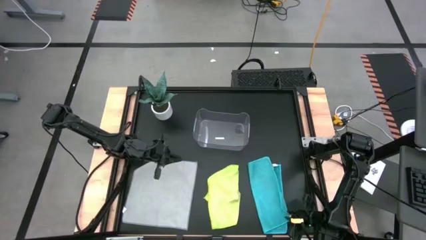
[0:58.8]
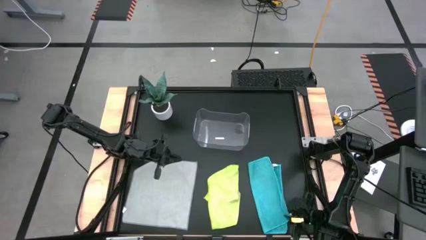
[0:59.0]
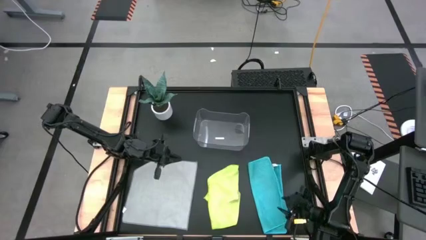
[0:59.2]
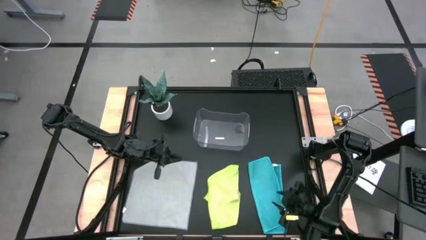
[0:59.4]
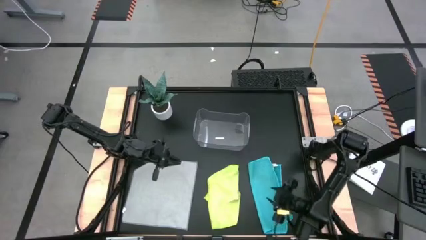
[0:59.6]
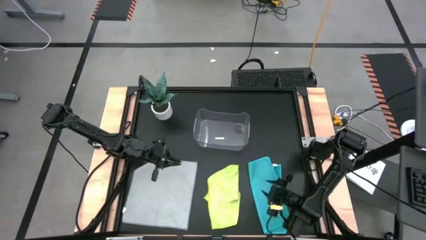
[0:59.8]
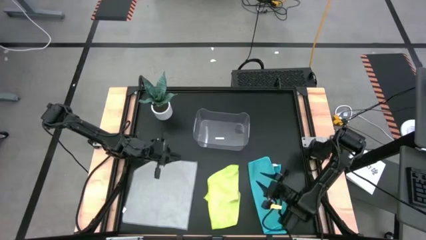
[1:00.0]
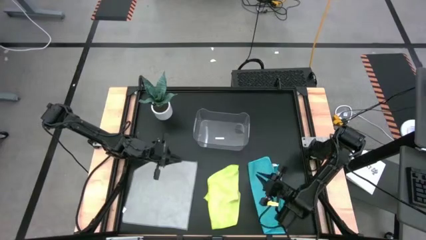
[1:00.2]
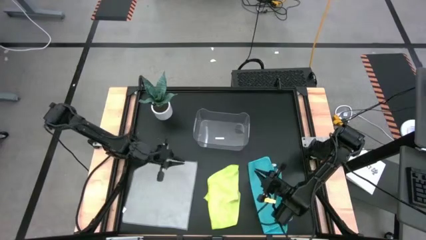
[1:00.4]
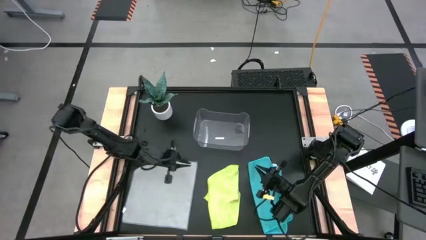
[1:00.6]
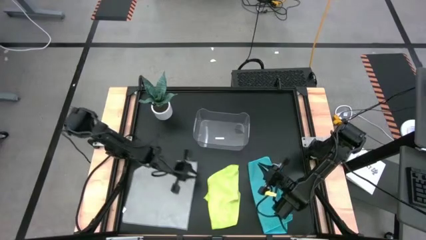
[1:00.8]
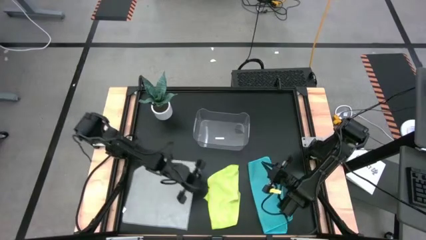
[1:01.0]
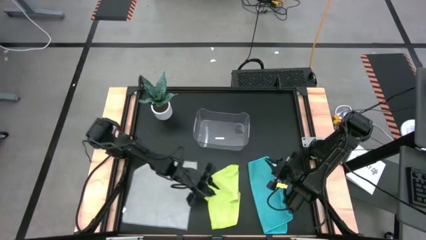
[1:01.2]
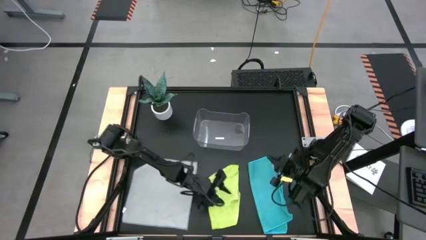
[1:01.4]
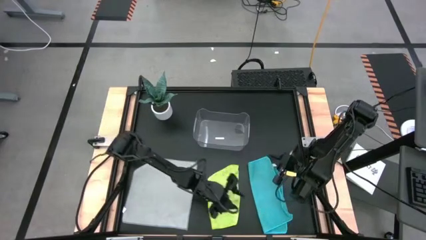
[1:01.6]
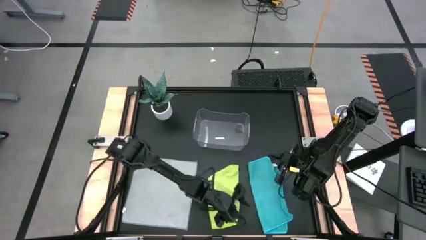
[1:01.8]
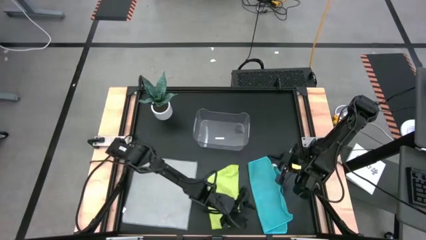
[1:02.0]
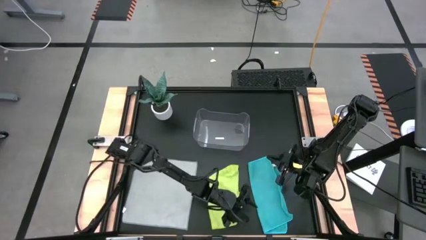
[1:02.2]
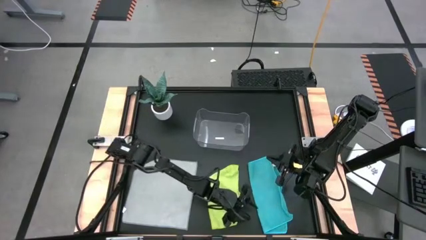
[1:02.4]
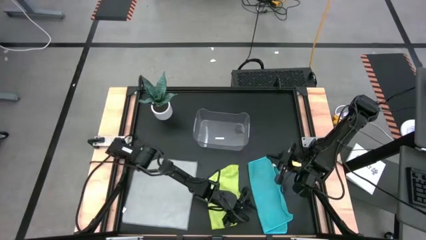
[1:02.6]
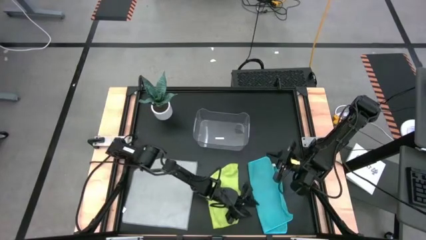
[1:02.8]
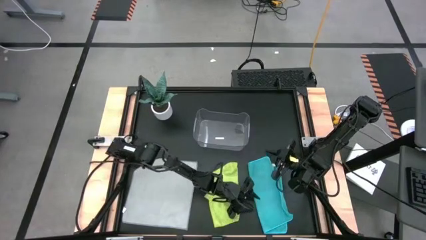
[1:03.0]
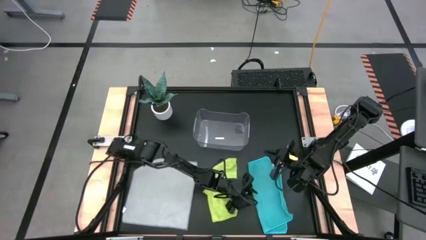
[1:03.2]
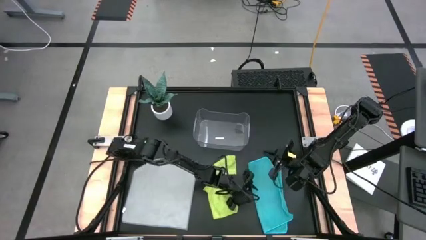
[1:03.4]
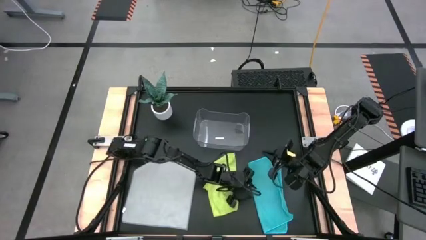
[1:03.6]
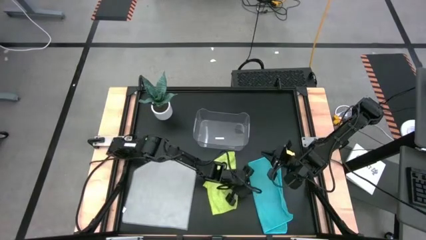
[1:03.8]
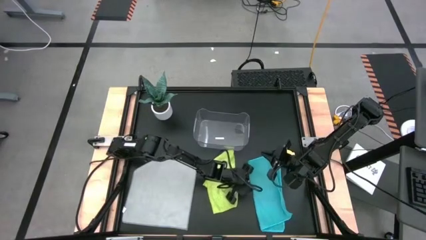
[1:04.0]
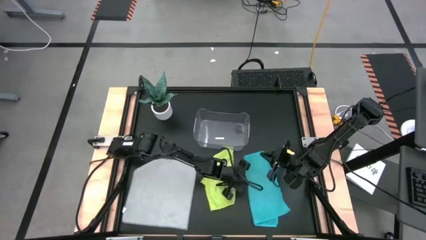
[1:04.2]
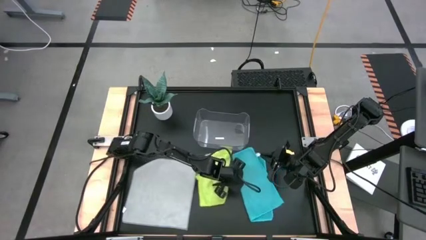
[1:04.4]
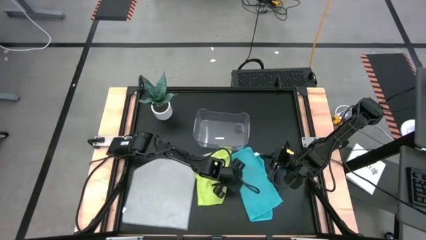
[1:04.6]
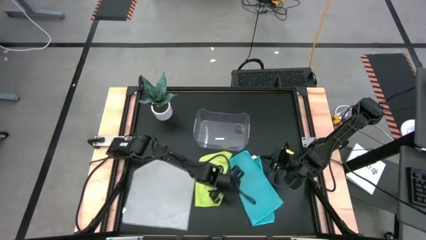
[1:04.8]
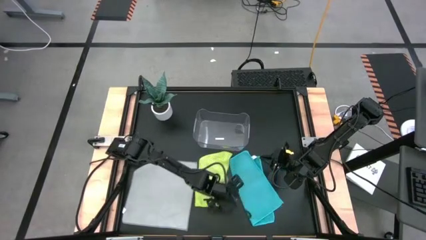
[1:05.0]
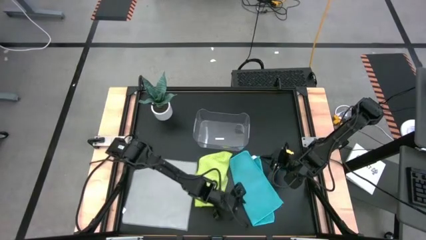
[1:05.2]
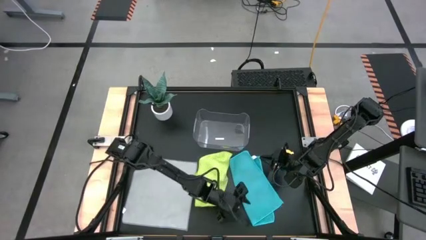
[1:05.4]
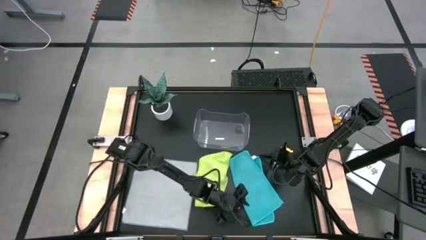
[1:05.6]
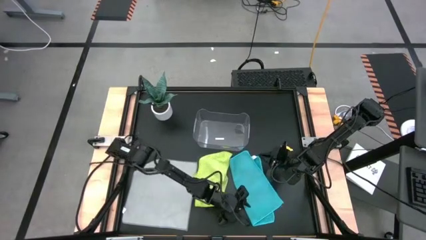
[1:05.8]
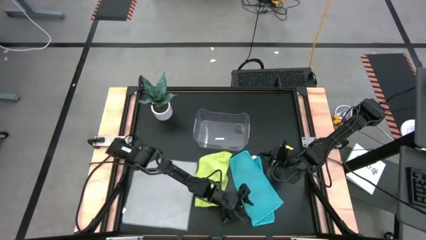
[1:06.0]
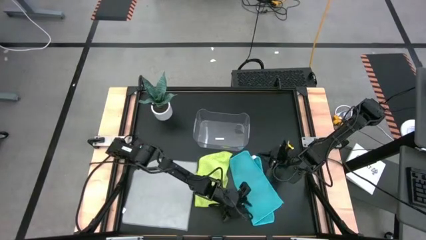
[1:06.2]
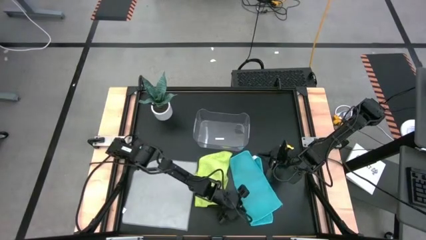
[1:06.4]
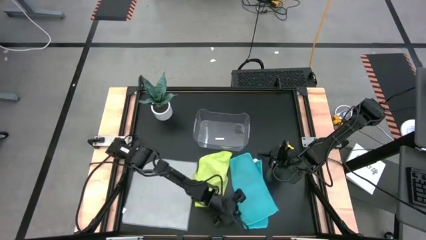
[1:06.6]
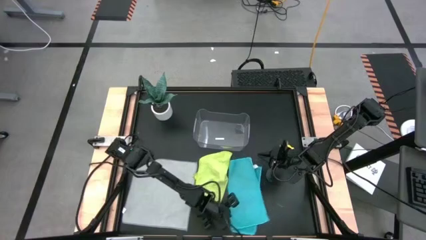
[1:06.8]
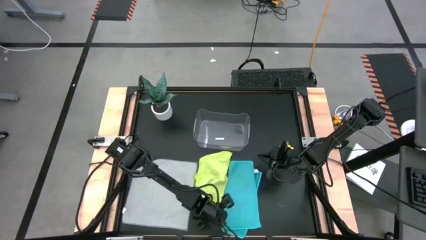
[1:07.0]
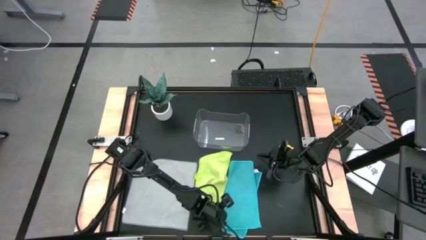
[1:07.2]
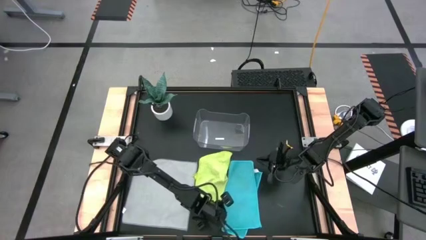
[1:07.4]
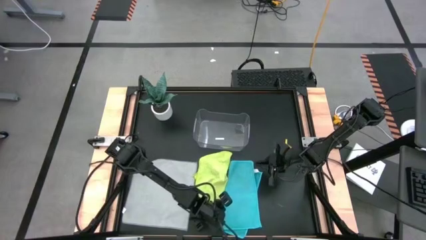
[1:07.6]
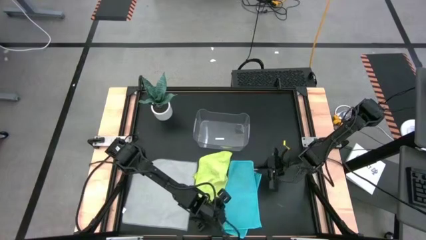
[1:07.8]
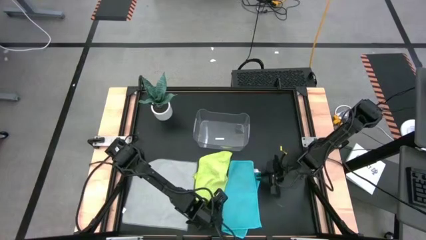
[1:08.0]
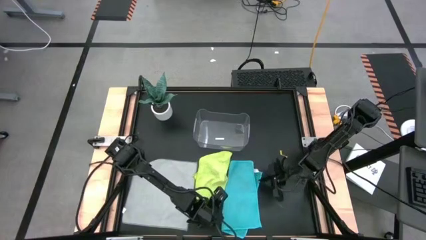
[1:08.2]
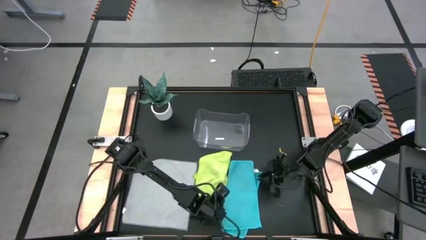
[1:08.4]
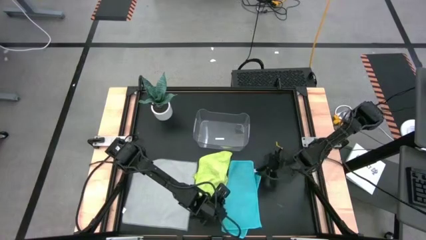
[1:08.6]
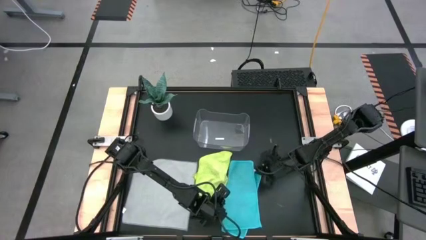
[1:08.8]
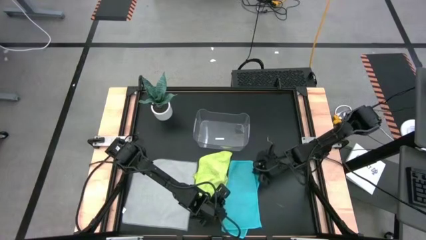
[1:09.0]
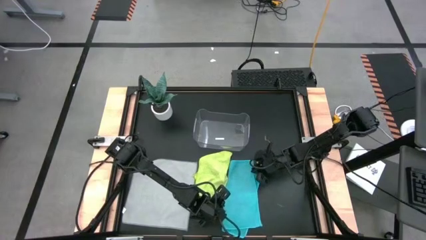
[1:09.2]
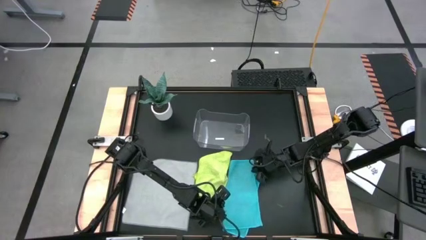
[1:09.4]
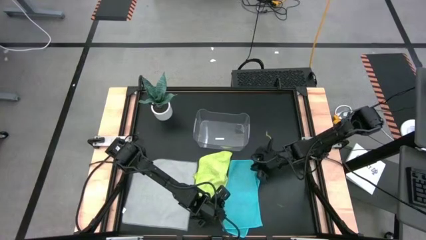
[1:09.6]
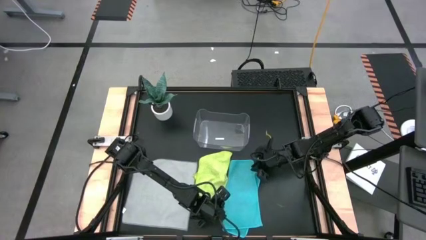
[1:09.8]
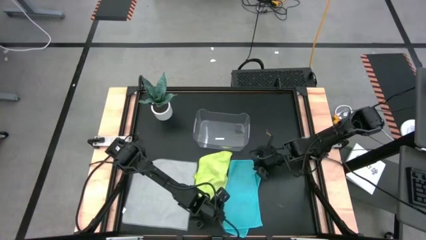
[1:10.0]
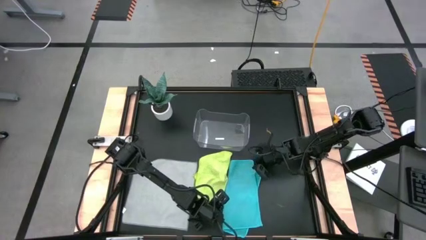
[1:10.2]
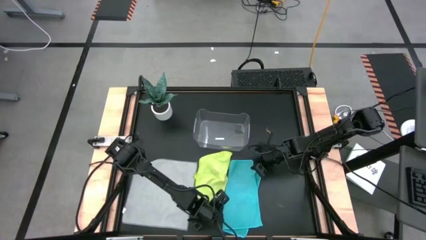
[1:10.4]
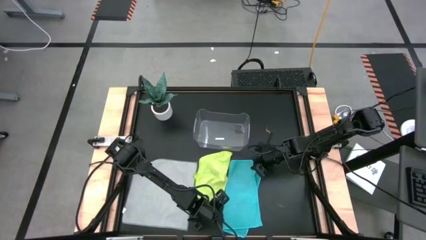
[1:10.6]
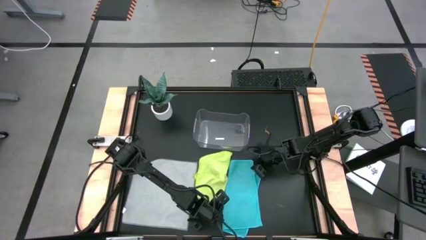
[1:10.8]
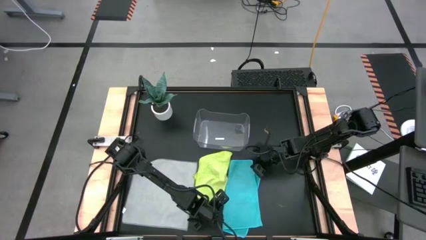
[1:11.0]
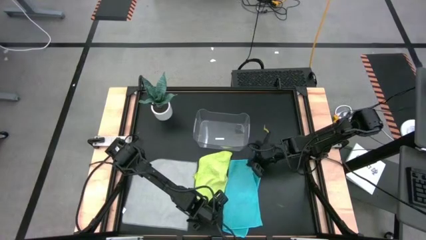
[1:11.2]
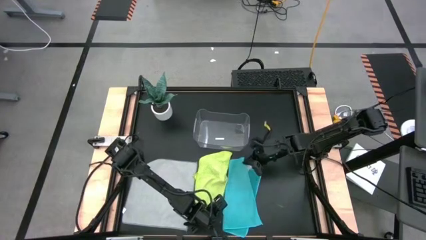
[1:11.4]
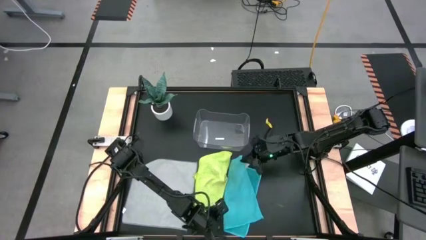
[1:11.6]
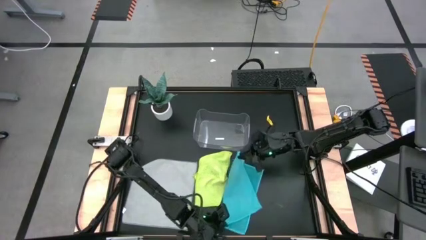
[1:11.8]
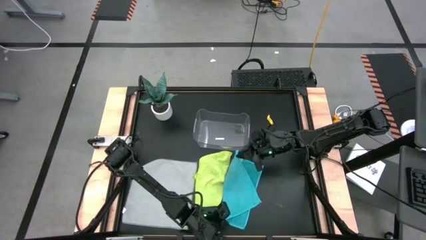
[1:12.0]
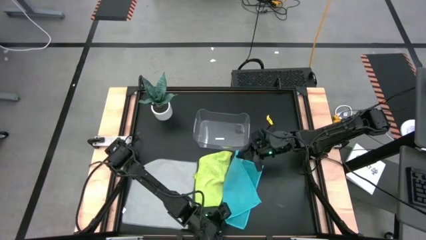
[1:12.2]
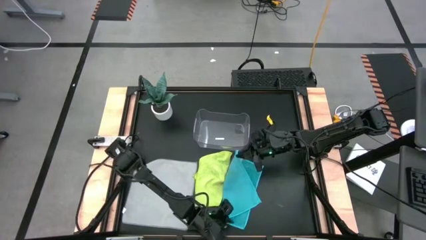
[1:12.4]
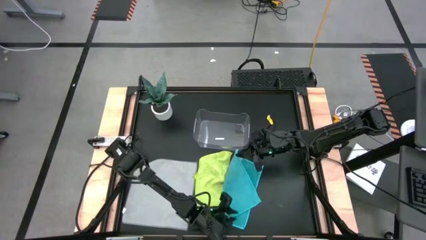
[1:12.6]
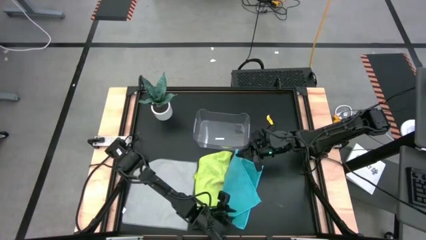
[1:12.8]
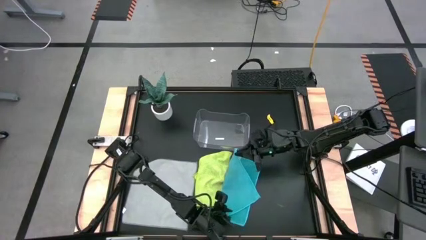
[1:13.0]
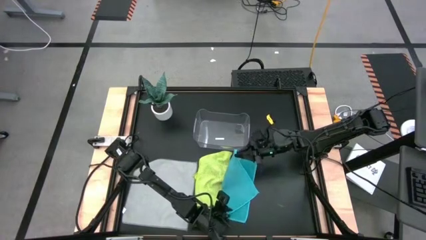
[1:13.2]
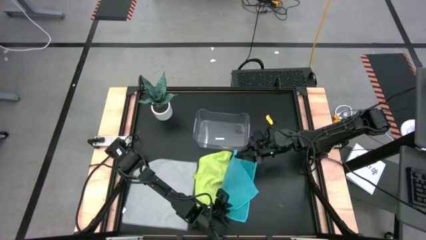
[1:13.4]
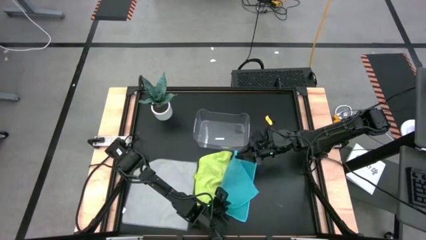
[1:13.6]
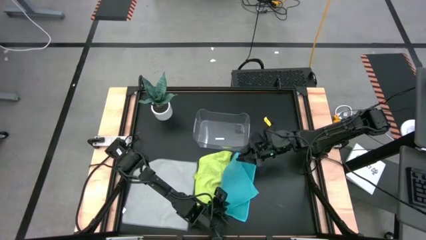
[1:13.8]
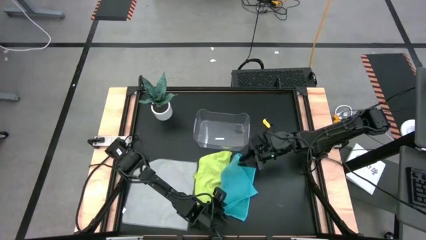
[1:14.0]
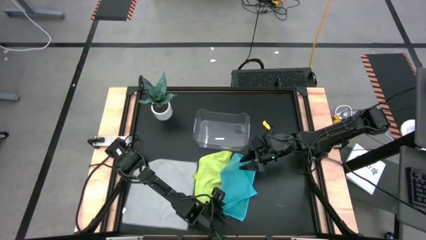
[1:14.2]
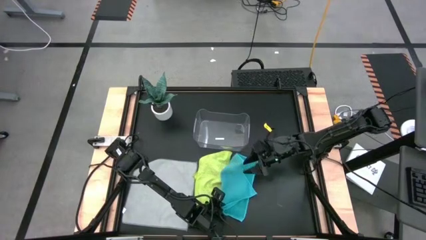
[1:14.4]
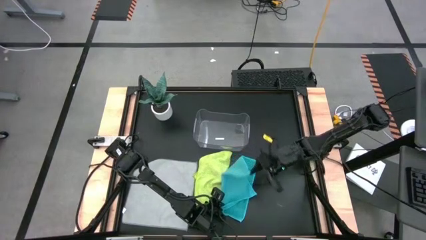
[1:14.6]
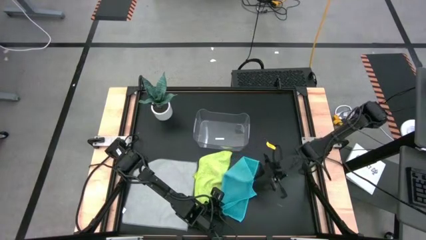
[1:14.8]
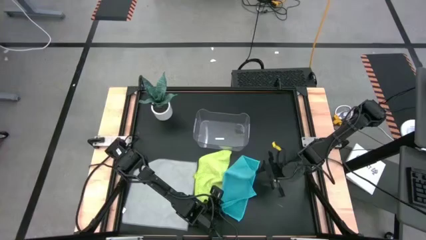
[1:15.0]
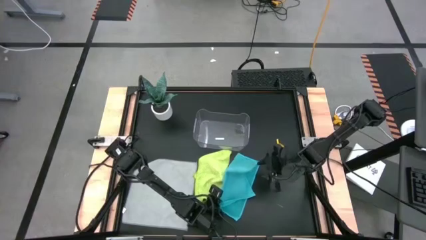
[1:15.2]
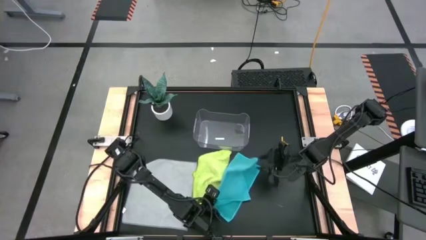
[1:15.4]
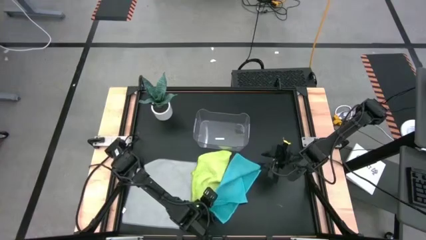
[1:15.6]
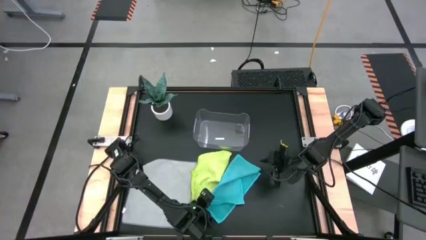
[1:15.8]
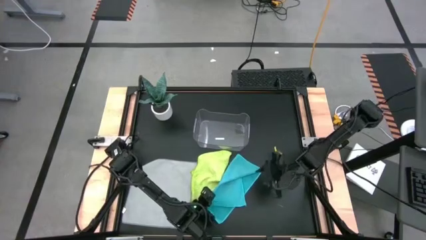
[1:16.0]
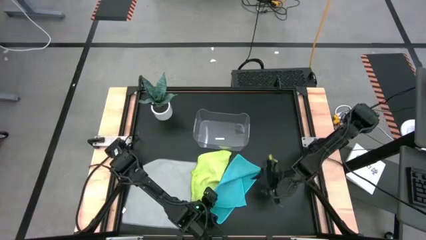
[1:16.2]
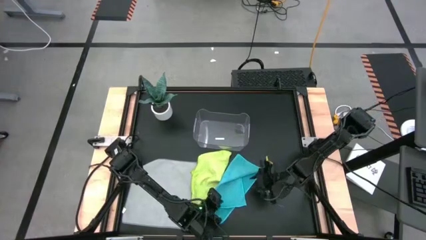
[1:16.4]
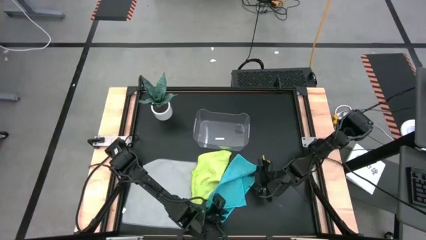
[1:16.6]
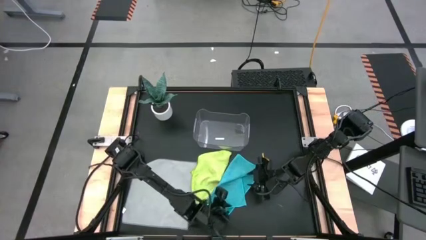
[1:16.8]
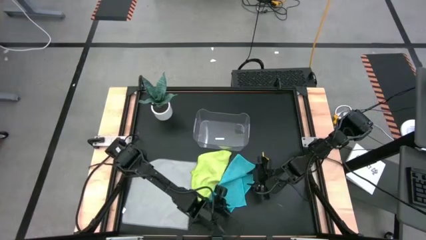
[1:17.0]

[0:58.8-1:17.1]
Task: Fold microfiber towels
Fold the blue towel
